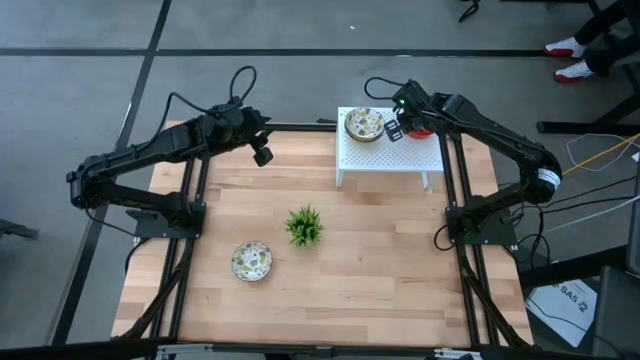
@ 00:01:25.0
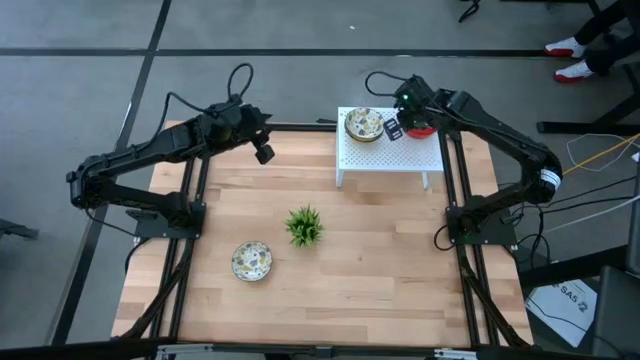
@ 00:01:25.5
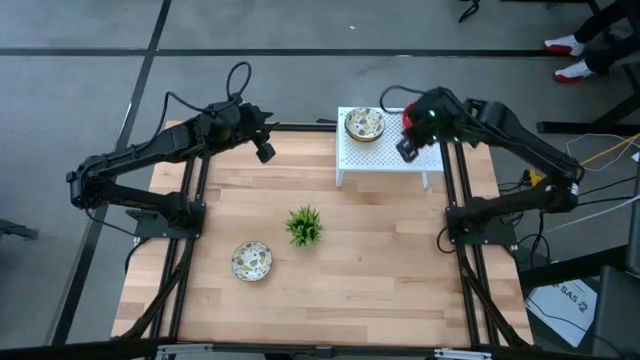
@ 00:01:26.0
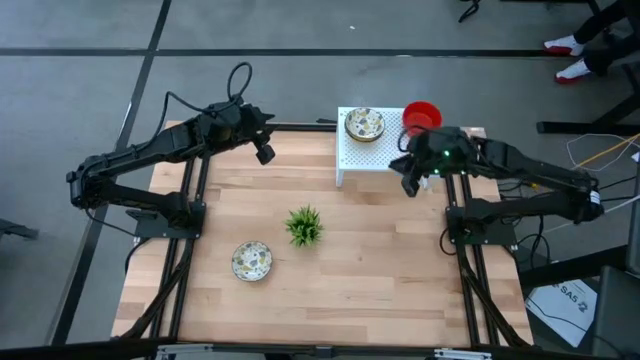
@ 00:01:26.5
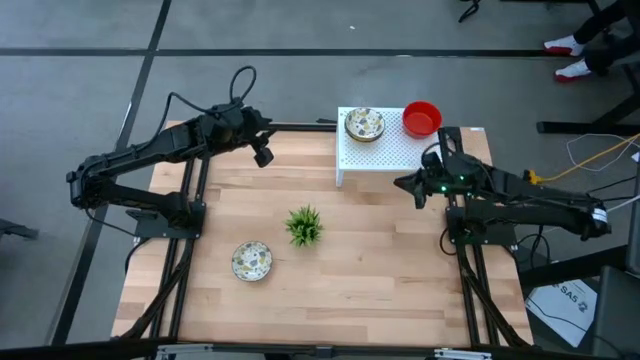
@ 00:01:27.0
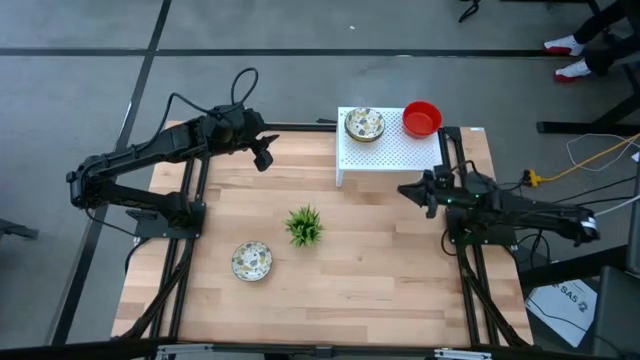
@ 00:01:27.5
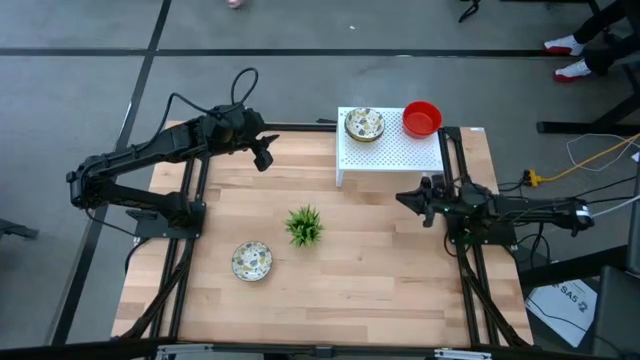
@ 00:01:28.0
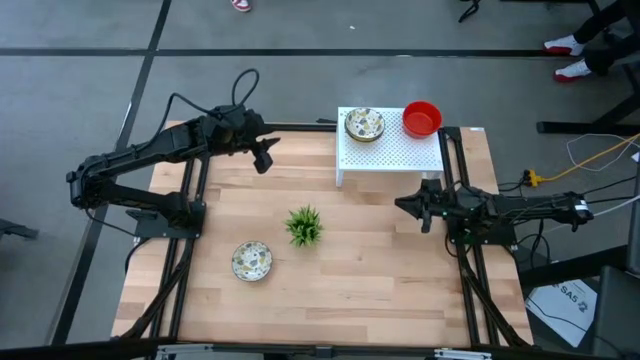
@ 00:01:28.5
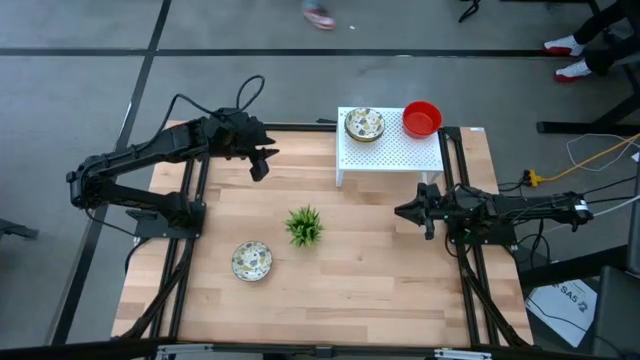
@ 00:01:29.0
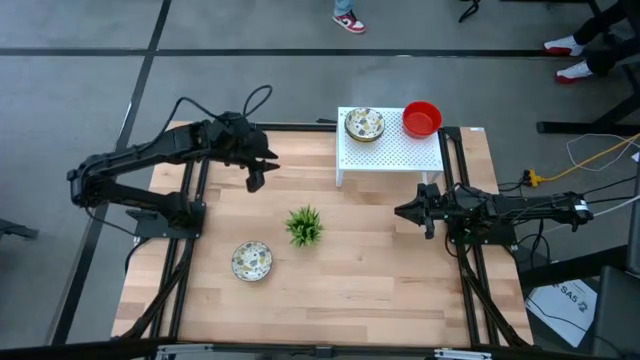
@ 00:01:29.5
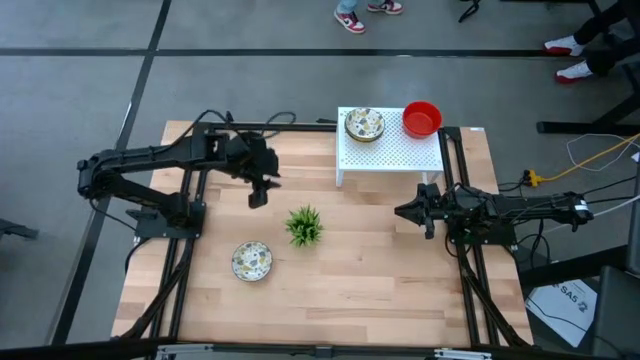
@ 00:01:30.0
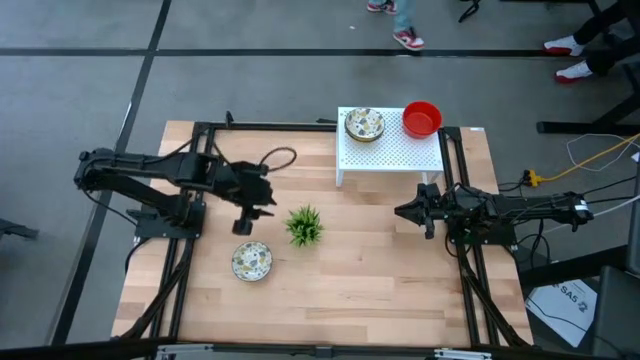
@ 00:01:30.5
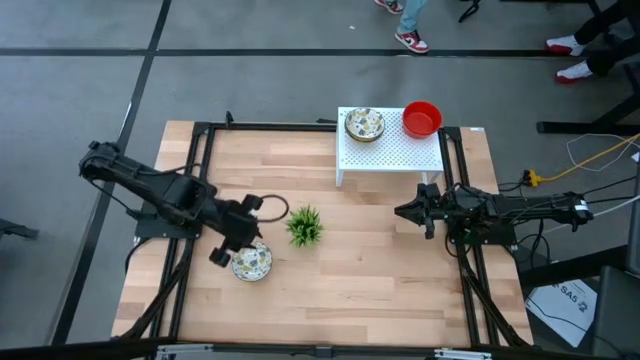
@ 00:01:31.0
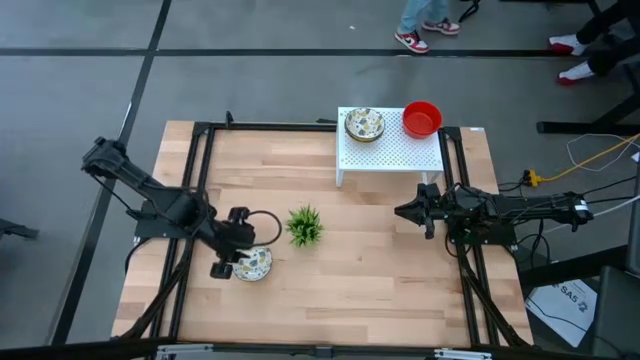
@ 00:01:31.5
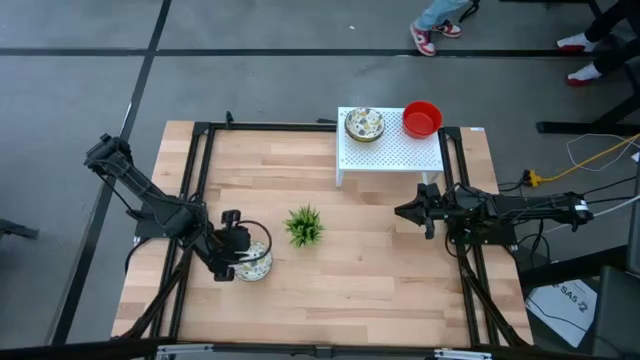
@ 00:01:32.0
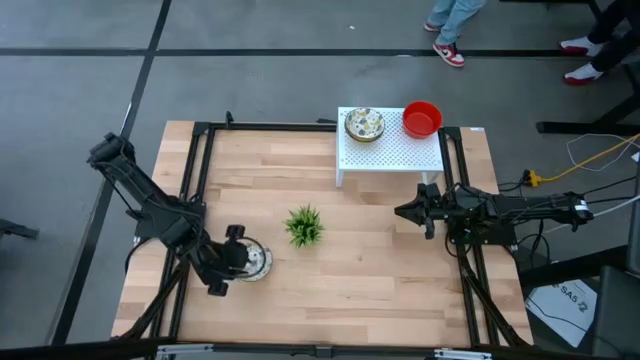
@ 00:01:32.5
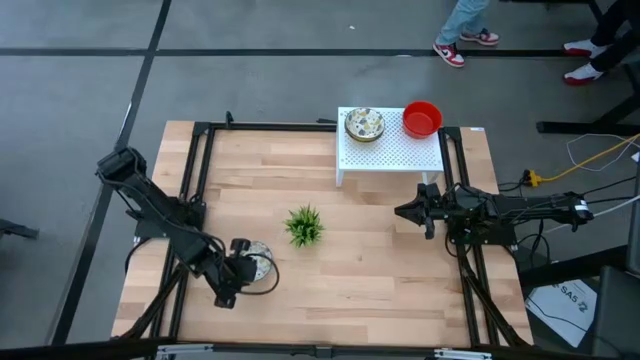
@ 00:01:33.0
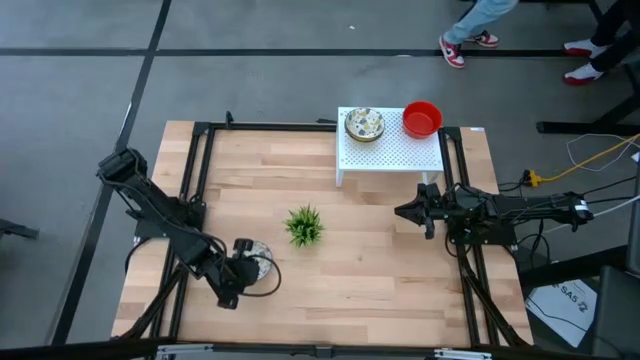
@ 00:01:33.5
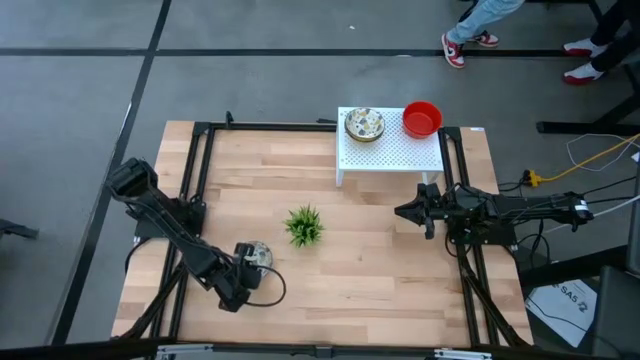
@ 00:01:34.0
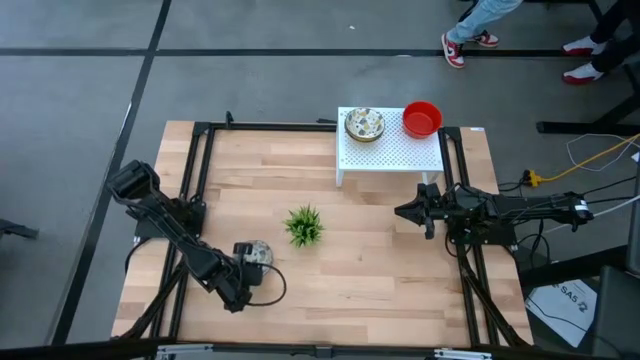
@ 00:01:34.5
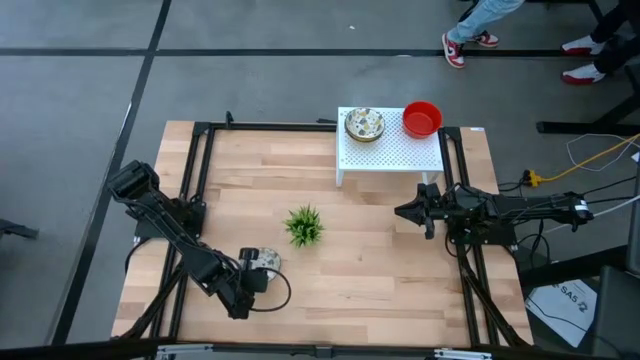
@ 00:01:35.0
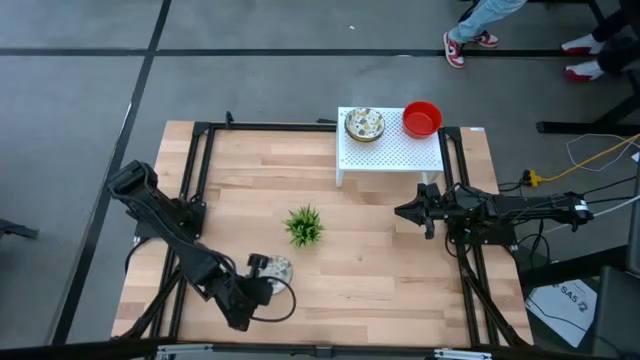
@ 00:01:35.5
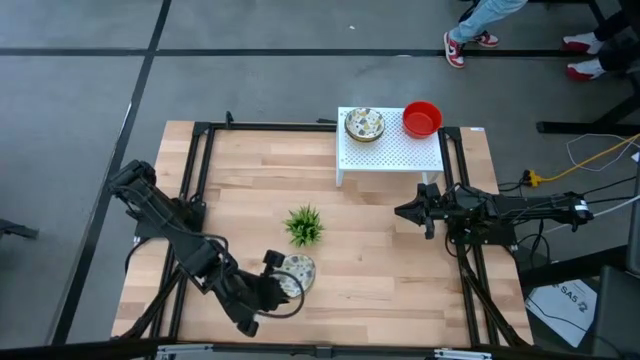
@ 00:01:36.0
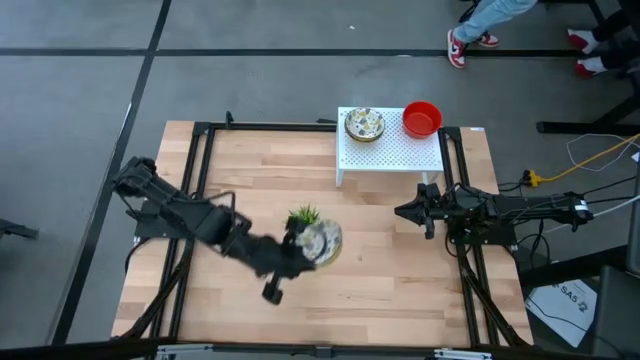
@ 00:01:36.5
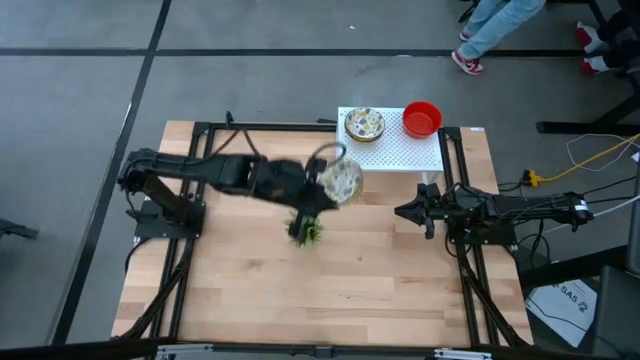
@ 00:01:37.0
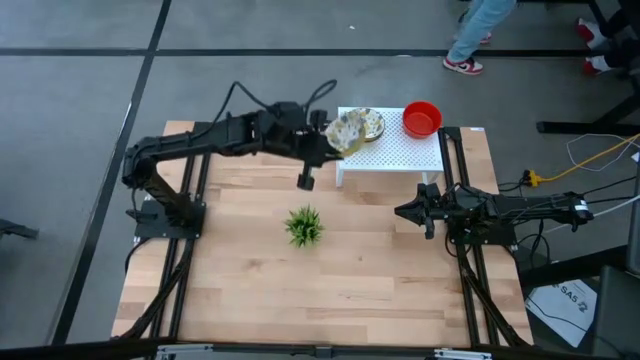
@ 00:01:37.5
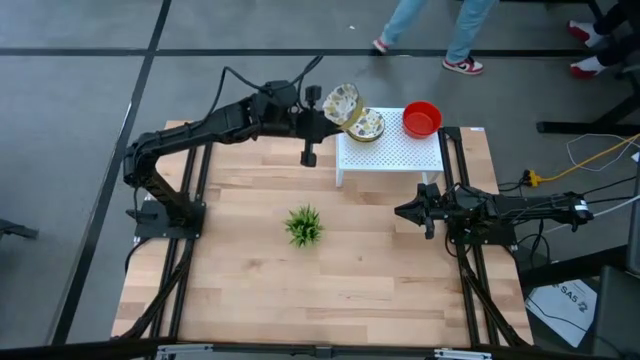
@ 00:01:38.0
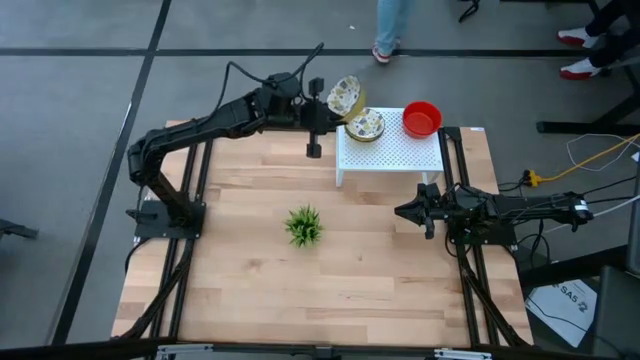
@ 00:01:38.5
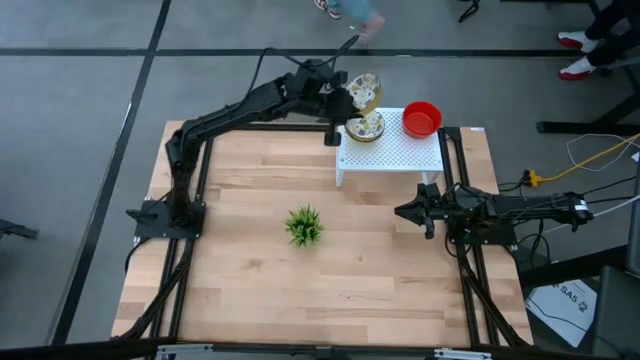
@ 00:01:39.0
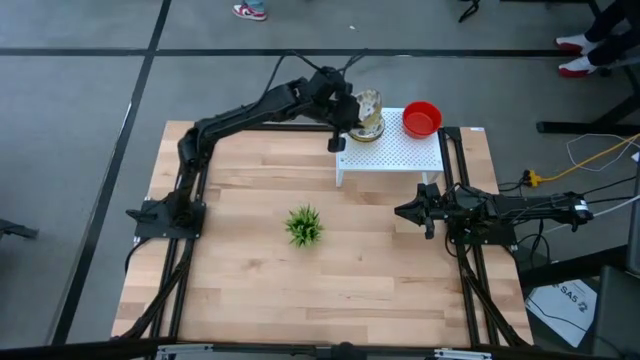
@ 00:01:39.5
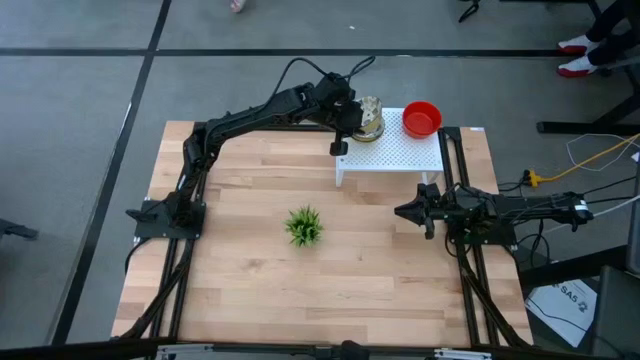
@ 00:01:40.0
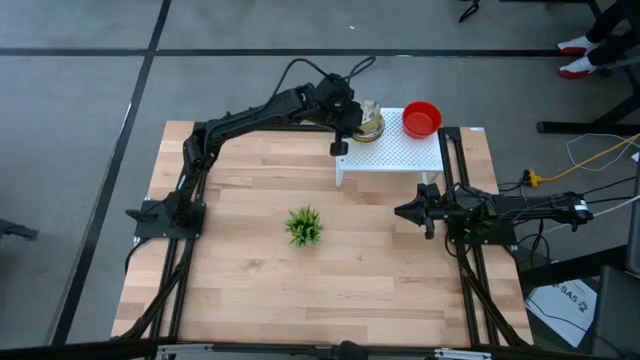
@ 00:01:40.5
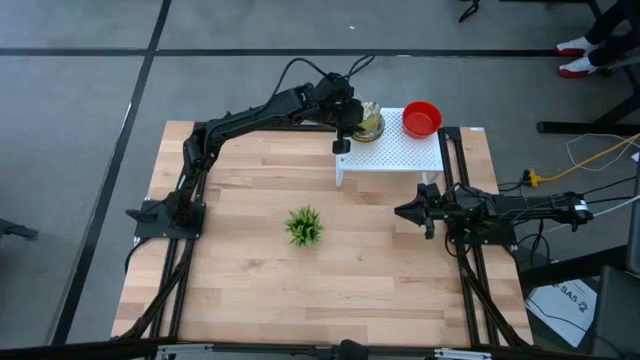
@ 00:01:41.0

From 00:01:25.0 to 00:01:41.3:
Task: Pick & Place Mini bowls
Stack the white bowl on the white bowl on the shelf

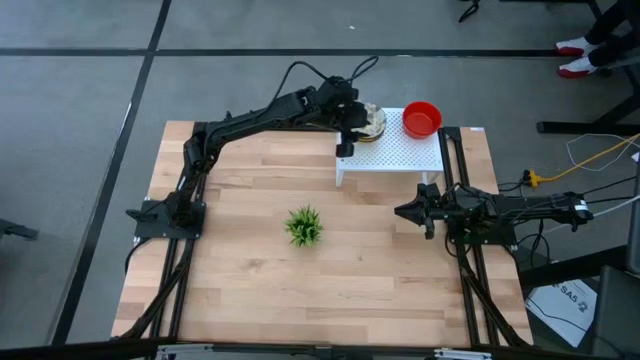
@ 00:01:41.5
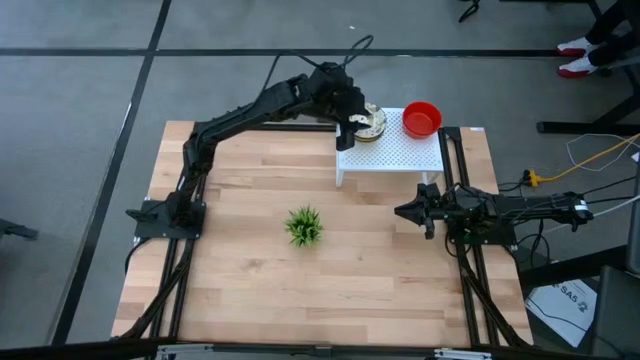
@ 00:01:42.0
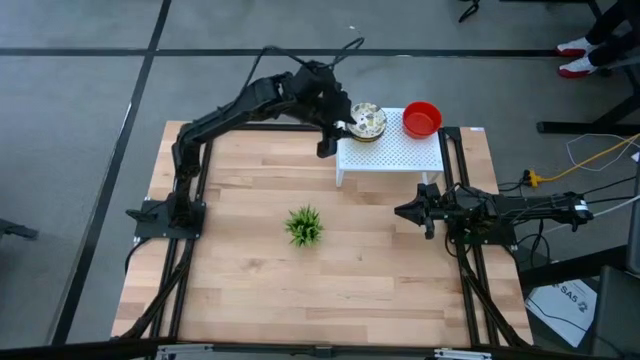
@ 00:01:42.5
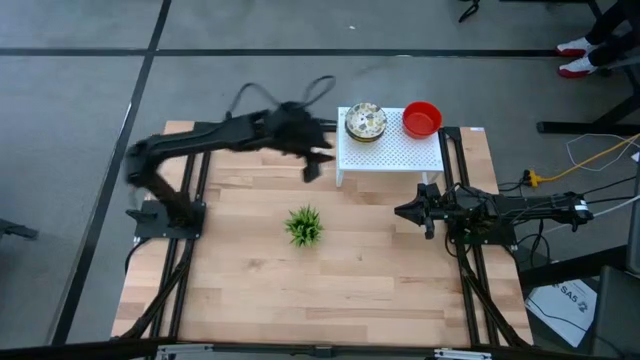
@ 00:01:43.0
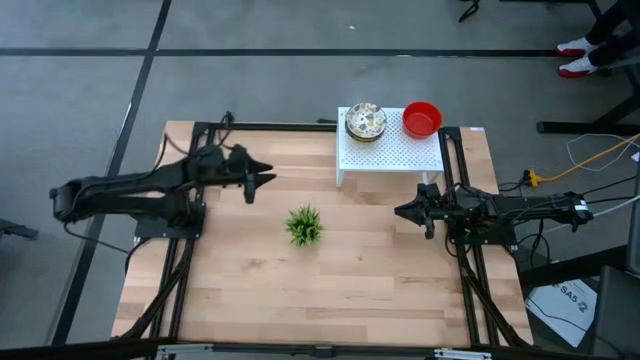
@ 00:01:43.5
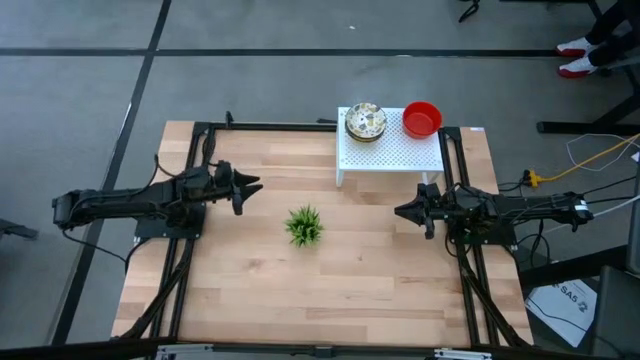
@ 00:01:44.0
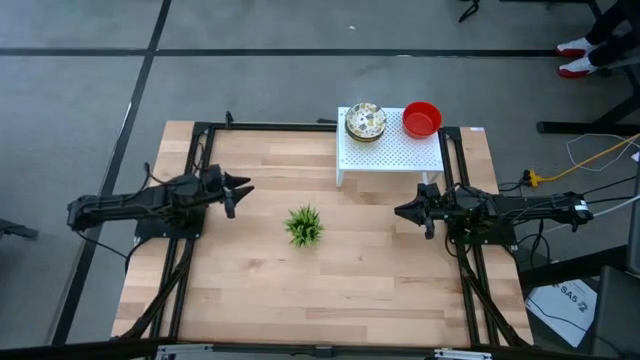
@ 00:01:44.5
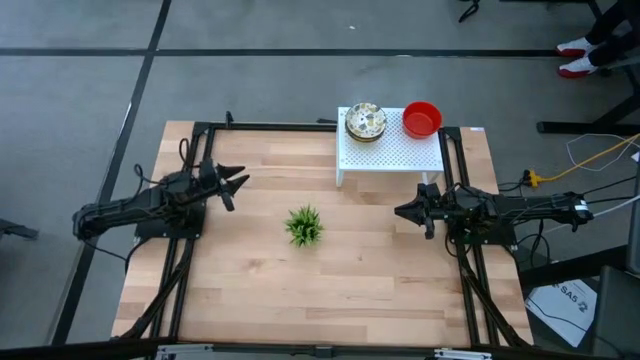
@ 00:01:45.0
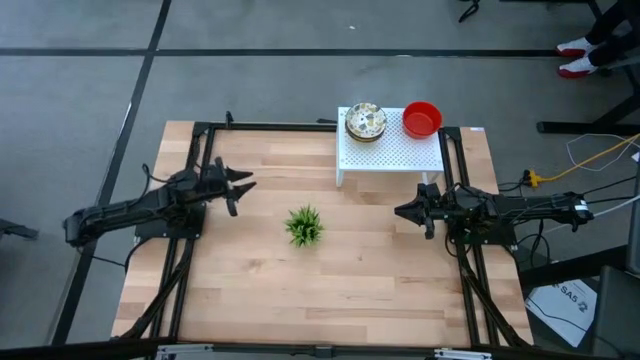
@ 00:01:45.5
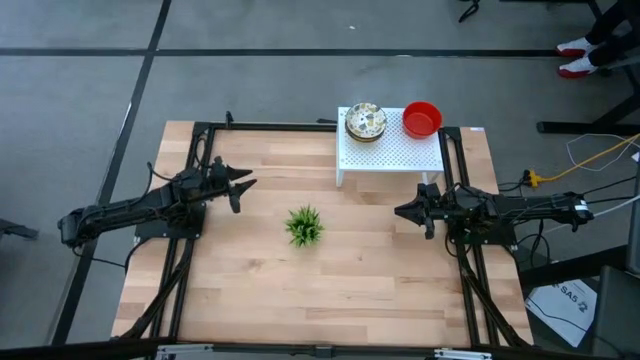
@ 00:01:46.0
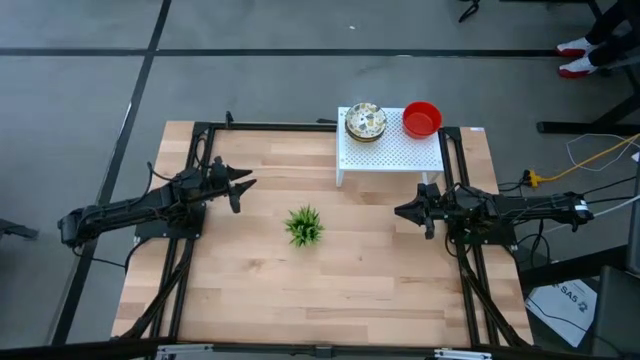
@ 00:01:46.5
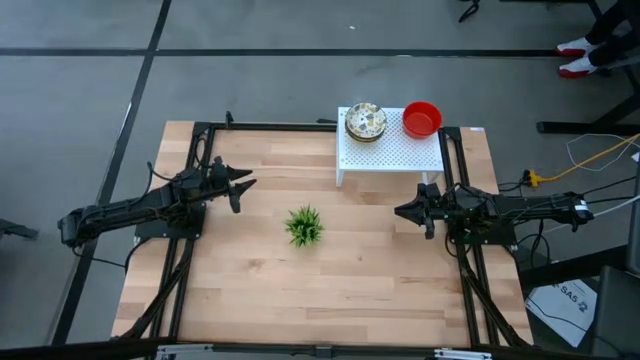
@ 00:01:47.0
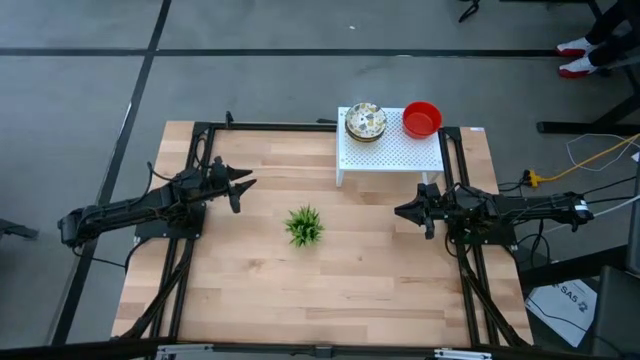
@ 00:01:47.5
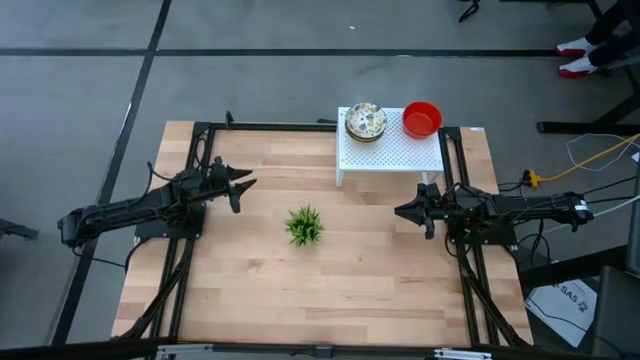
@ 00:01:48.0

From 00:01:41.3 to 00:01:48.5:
Return to Home Position
